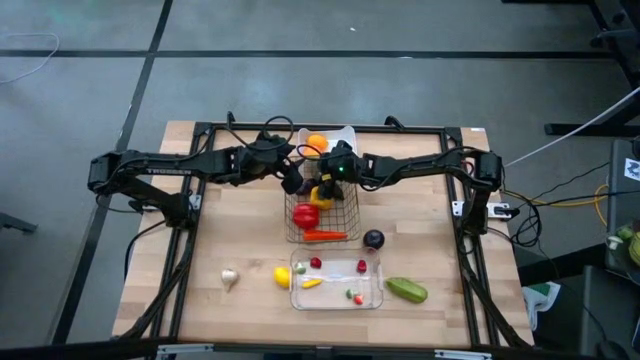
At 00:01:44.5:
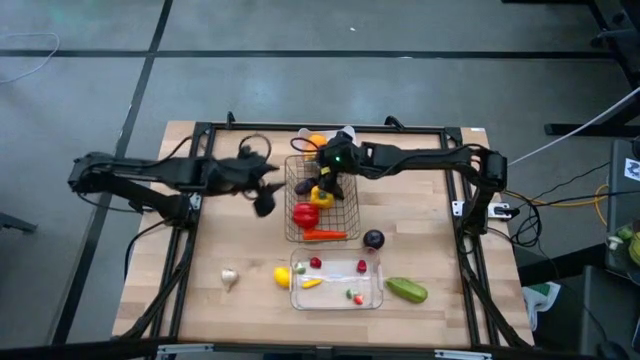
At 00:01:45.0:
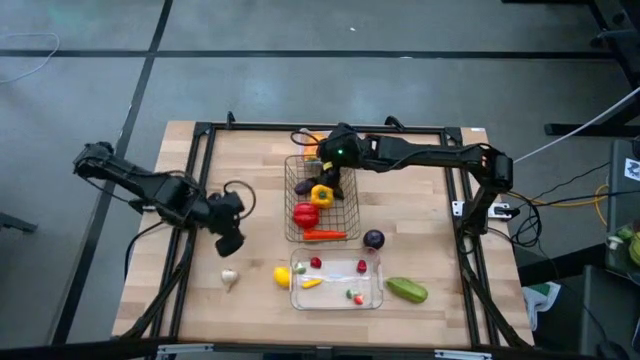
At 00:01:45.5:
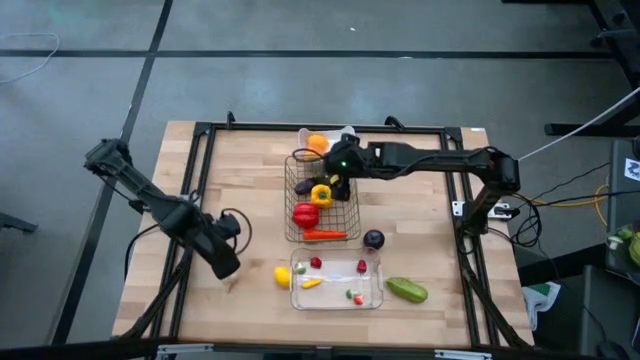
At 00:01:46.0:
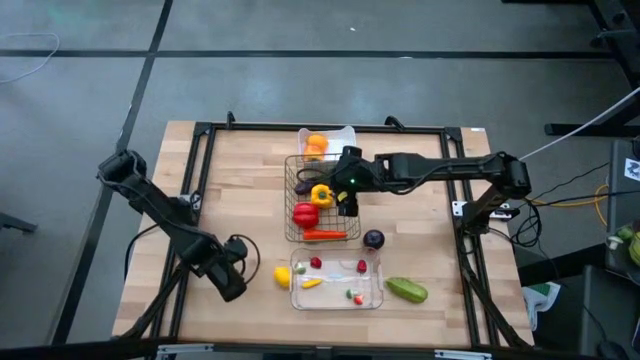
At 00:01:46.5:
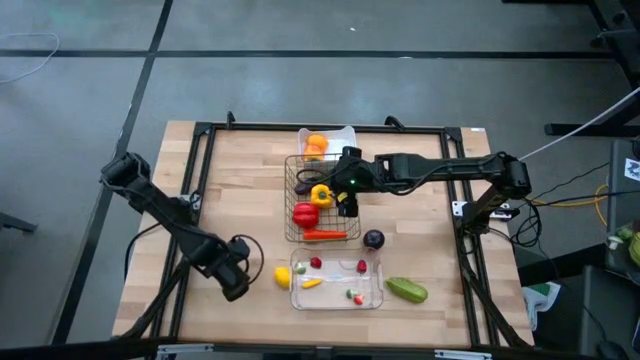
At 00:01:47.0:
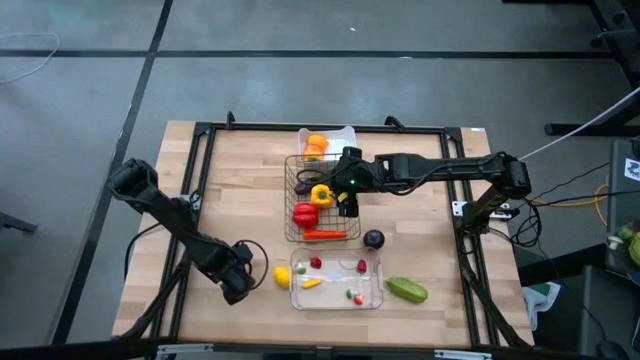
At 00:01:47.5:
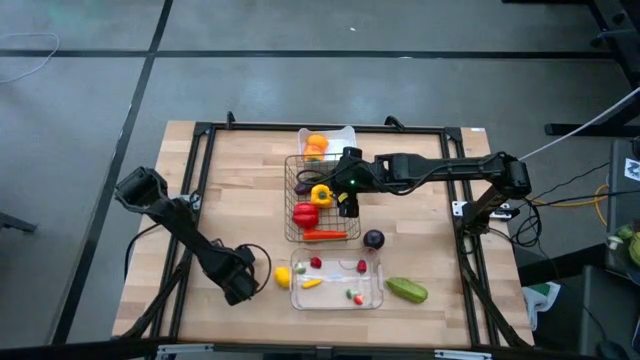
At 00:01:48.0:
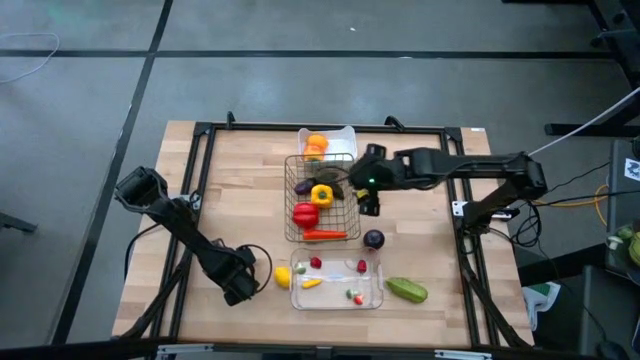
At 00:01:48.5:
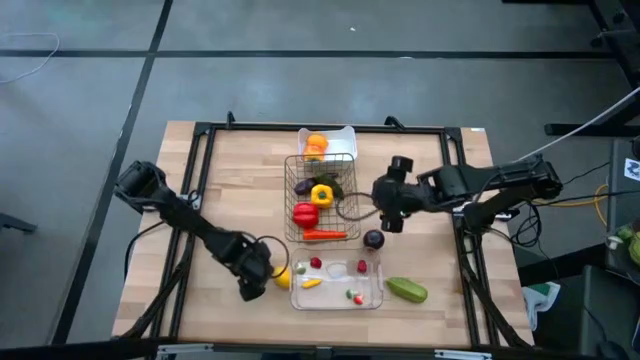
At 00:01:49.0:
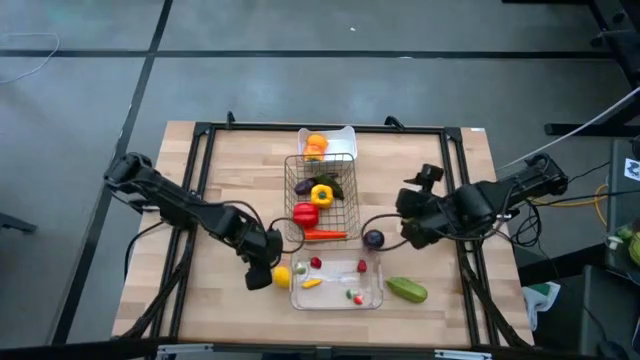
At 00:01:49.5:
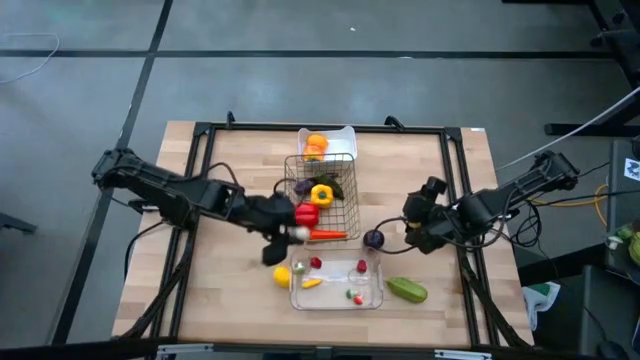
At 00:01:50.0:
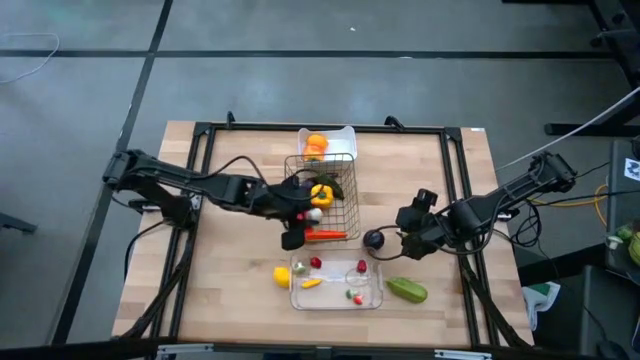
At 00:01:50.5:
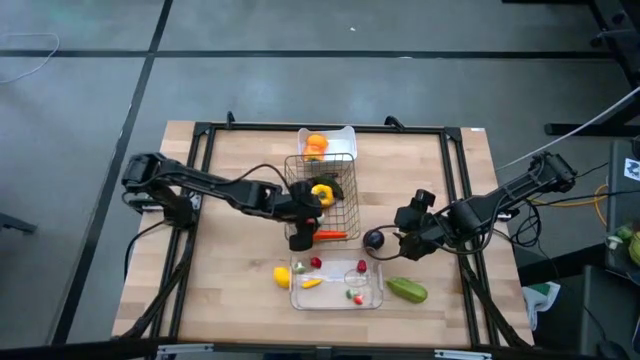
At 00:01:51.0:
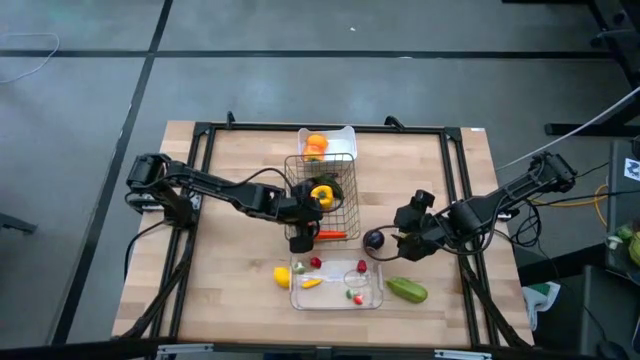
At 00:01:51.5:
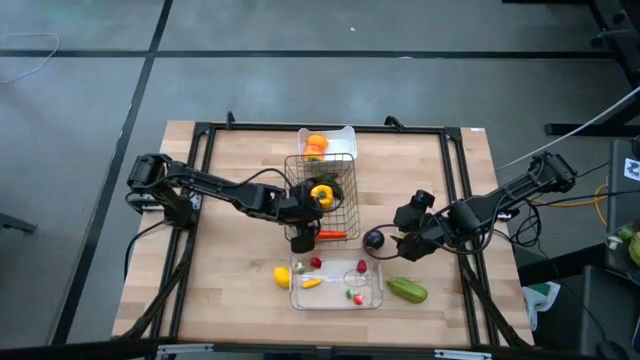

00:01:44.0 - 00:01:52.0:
Task: Sort produce into baskets
Put the white garlic into the wire basket

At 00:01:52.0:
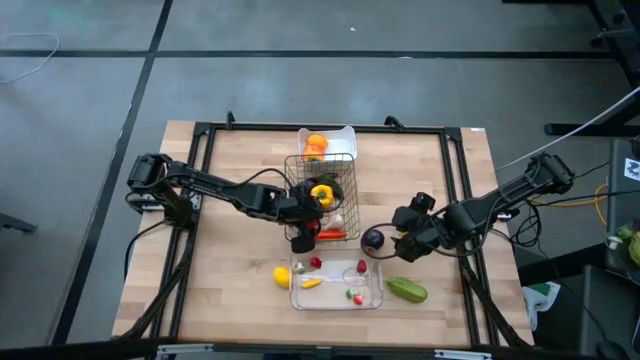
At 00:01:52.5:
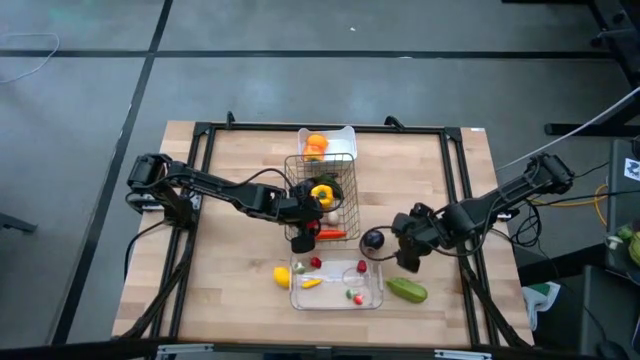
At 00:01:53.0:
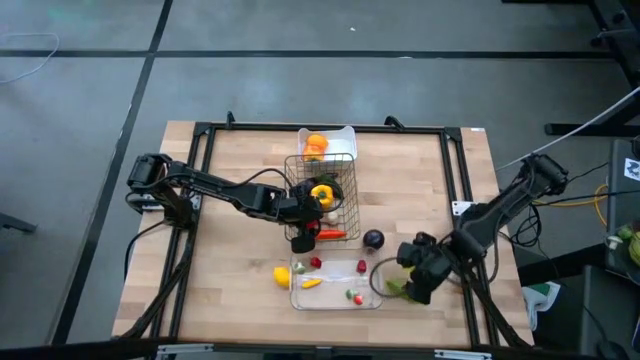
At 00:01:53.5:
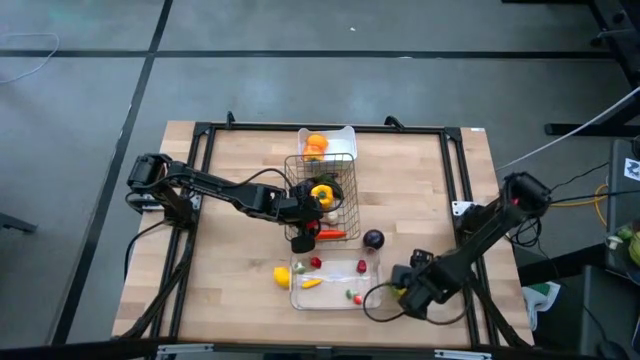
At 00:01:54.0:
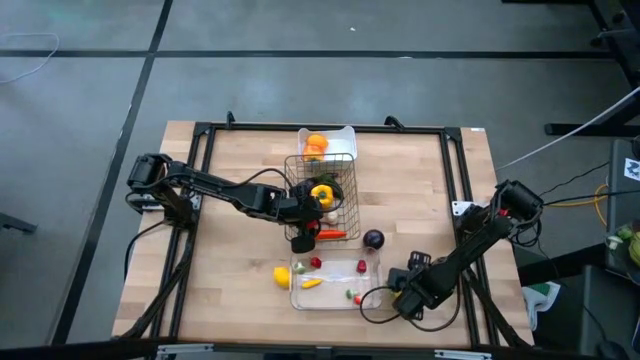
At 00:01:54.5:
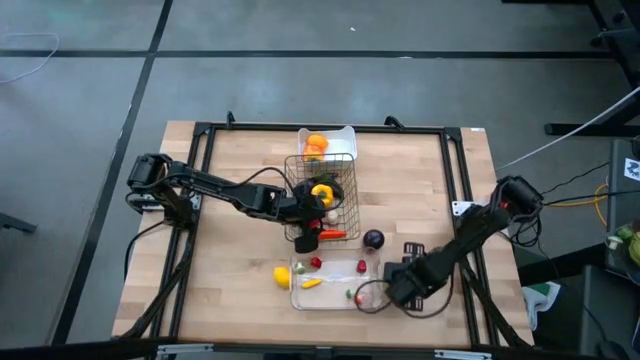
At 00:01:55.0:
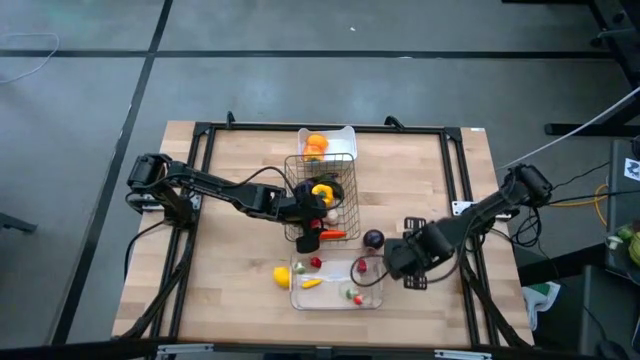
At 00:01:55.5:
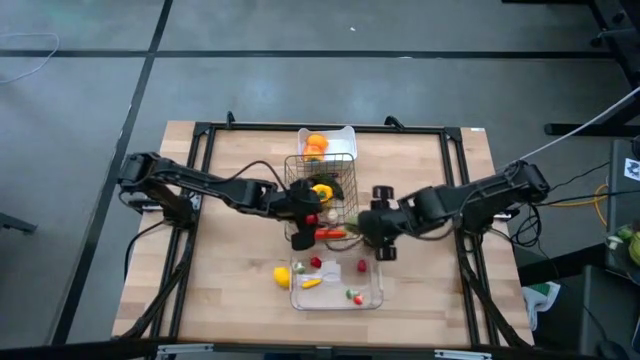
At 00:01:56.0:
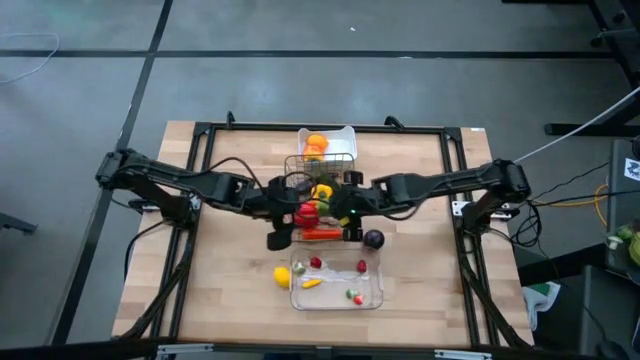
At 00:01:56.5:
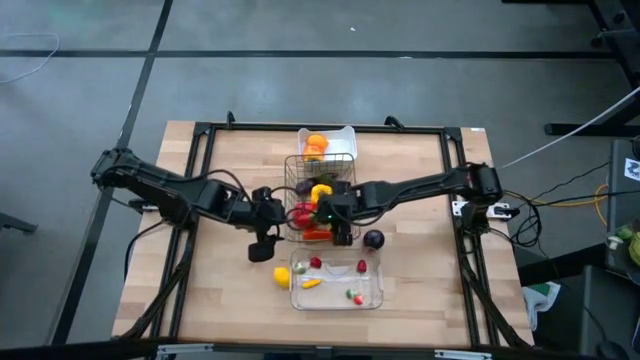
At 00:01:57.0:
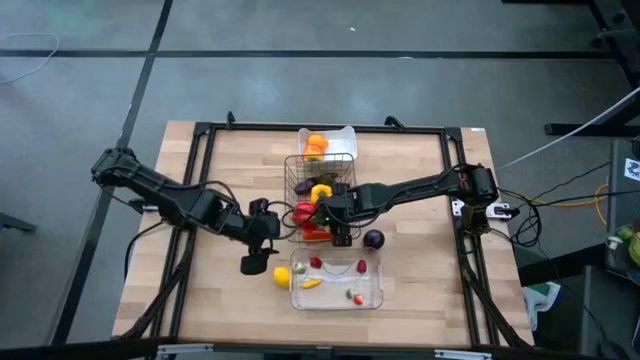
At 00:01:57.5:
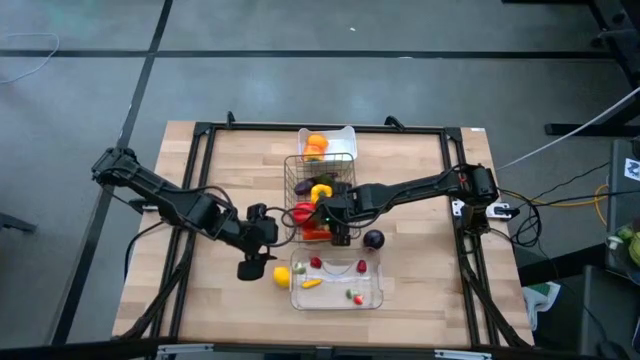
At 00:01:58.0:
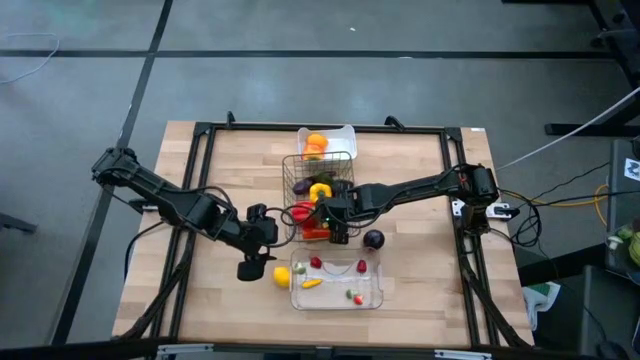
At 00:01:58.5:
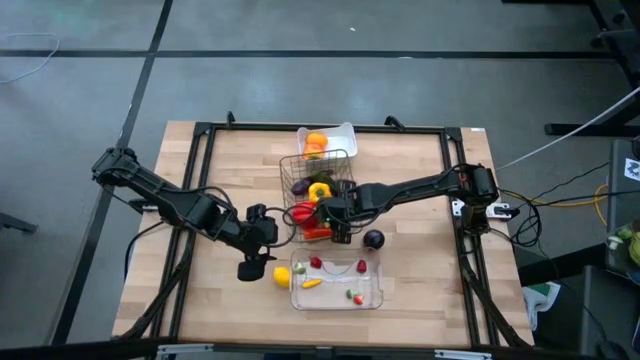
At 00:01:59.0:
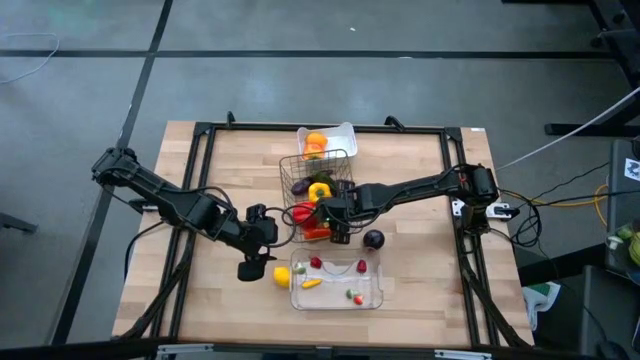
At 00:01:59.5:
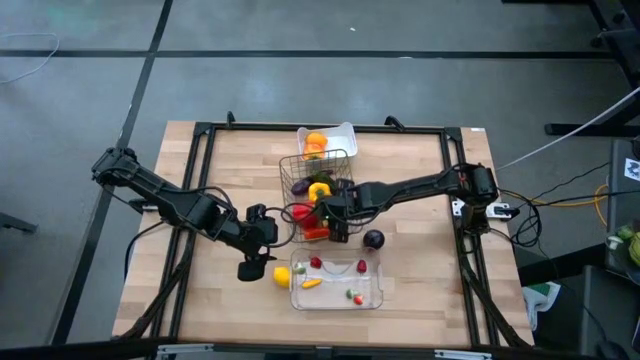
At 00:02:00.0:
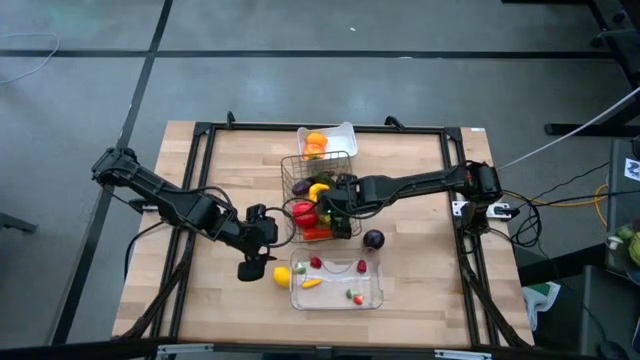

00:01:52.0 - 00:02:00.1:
Put the cucumber into the wire basket

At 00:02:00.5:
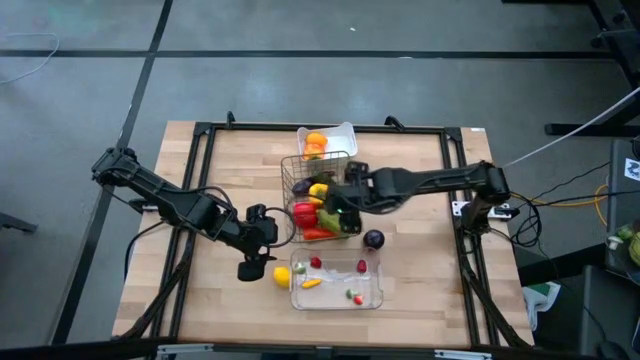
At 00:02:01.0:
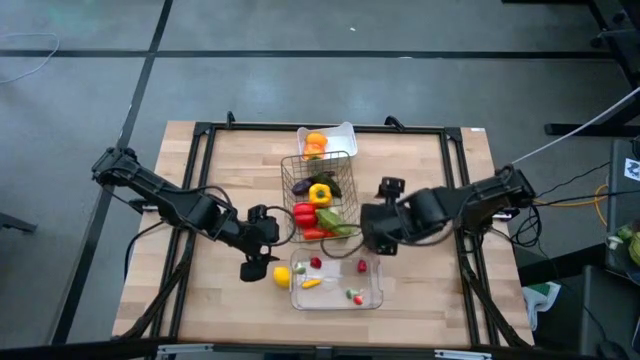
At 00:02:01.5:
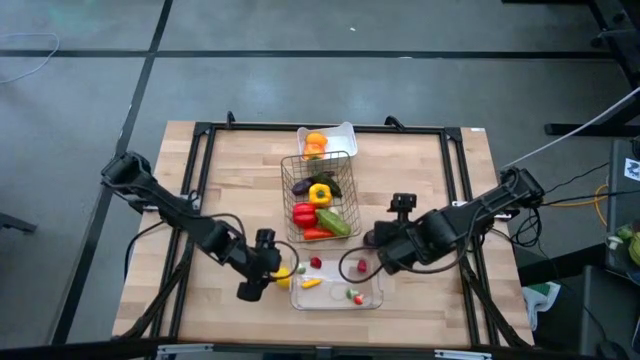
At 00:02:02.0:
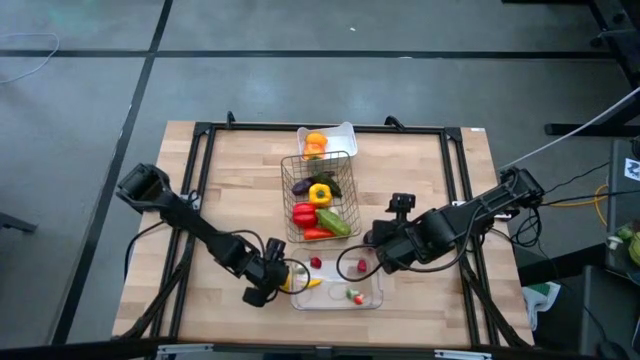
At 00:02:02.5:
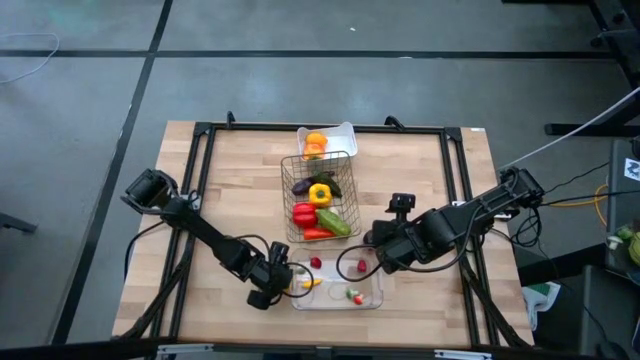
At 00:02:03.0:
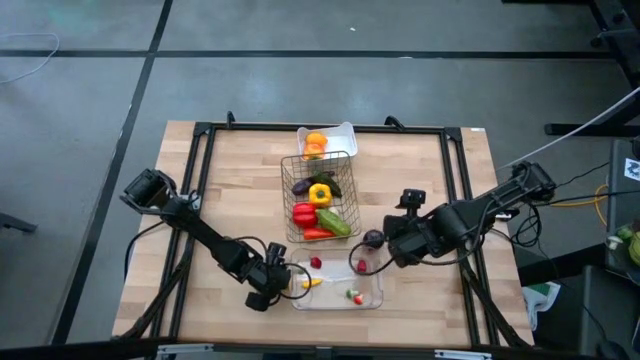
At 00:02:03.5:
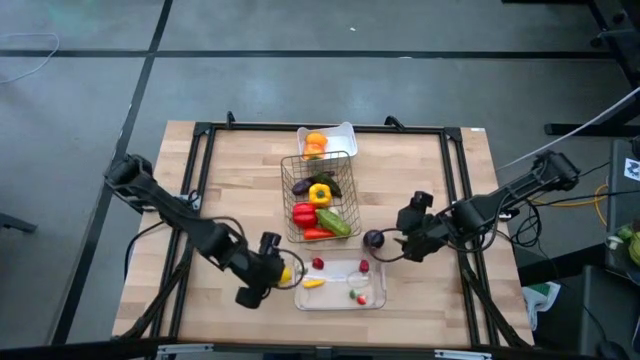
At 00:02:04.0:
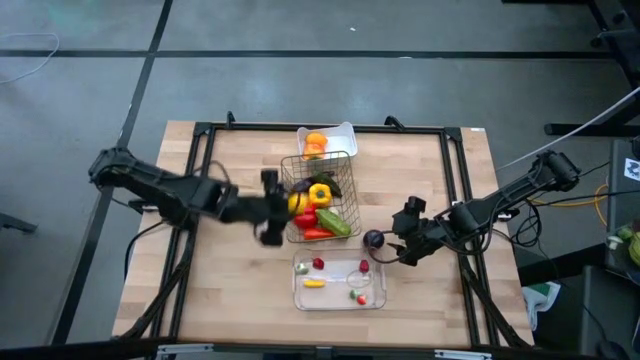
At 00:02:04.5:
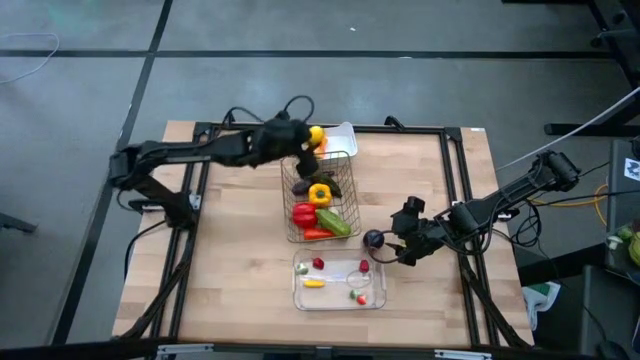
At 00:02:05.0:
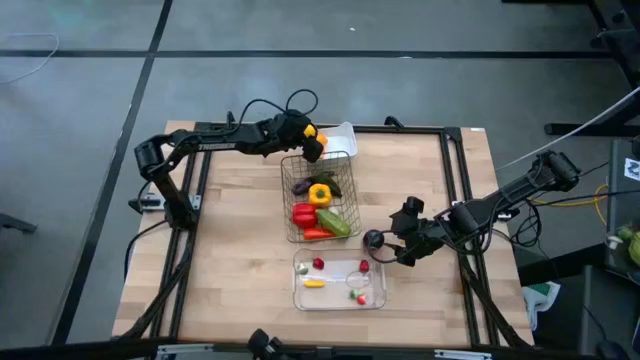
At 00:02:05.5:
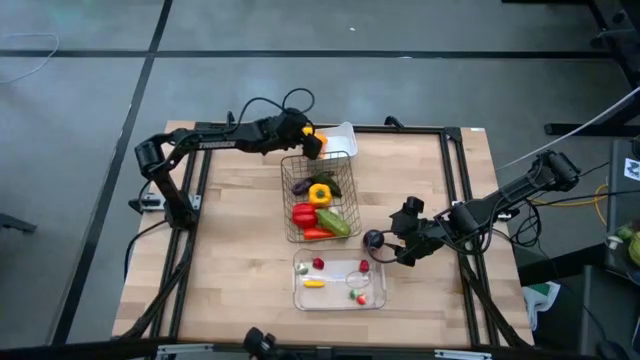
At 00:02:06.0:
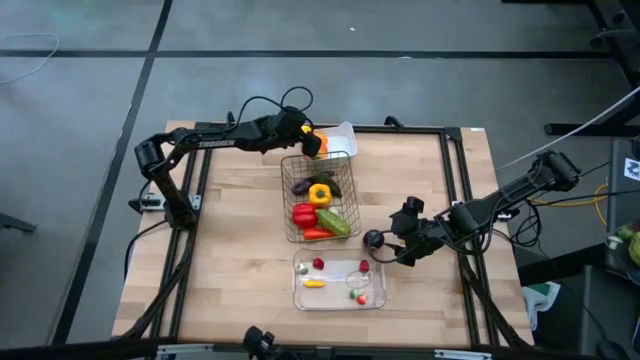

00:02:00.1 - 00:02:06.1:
Put the lemon into the white bin
